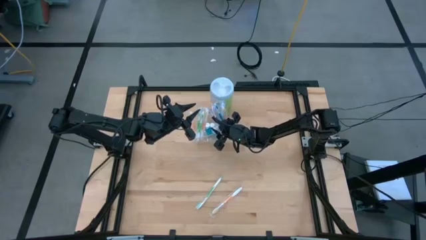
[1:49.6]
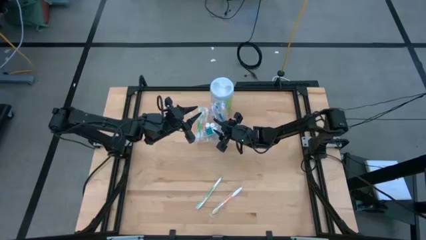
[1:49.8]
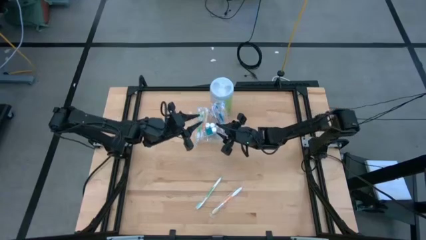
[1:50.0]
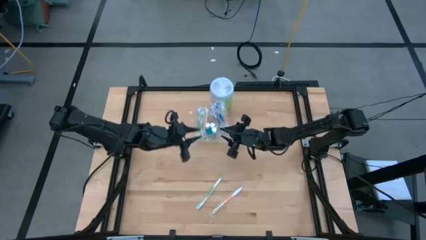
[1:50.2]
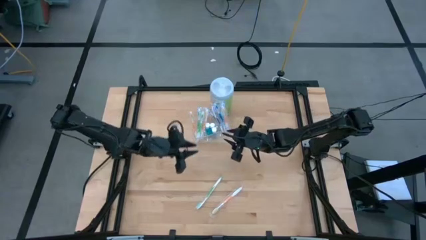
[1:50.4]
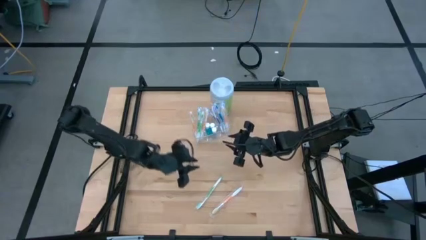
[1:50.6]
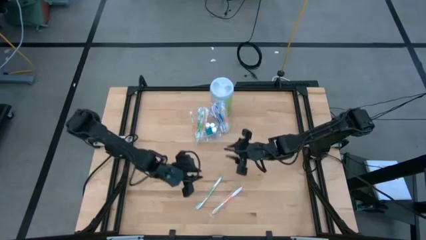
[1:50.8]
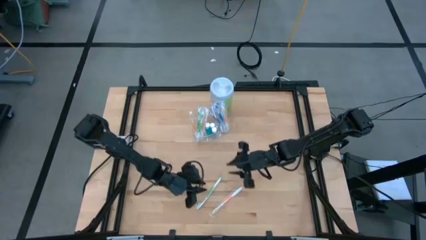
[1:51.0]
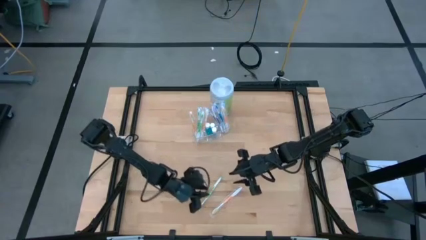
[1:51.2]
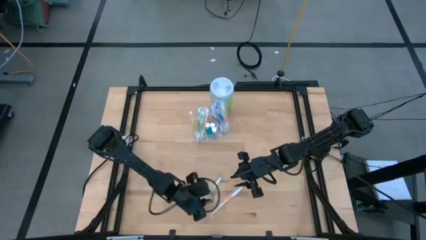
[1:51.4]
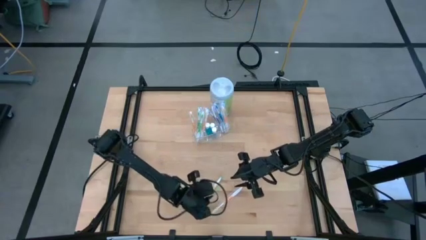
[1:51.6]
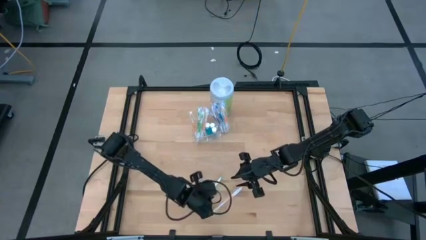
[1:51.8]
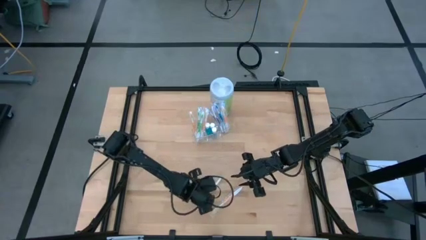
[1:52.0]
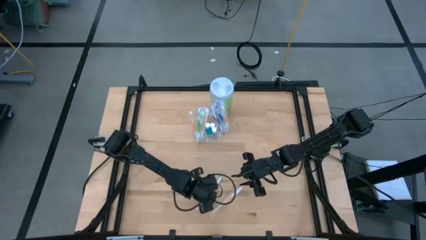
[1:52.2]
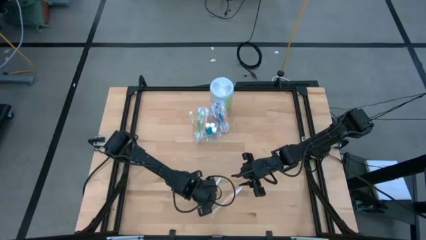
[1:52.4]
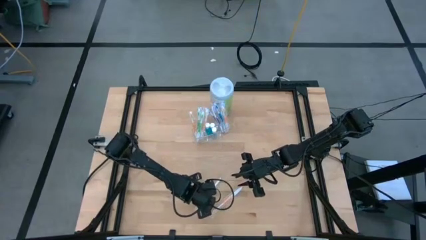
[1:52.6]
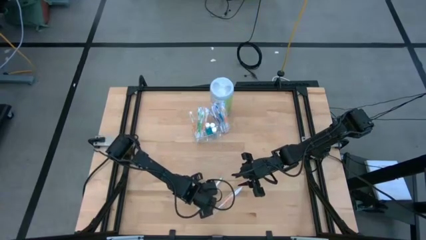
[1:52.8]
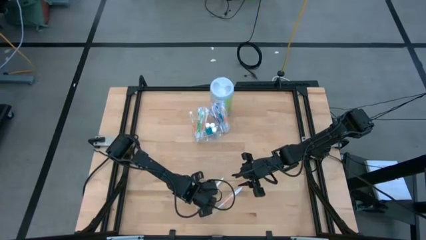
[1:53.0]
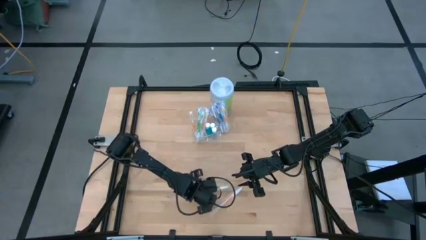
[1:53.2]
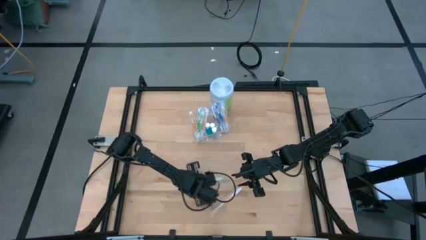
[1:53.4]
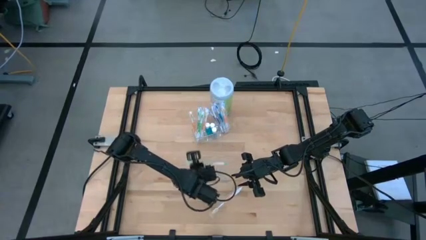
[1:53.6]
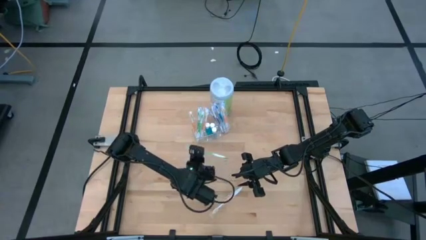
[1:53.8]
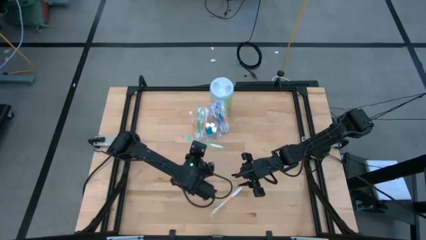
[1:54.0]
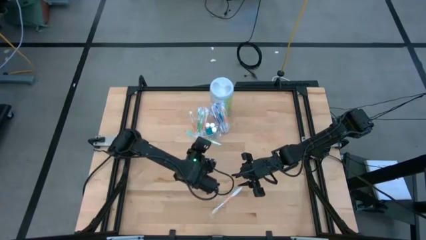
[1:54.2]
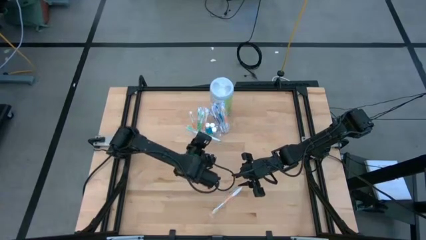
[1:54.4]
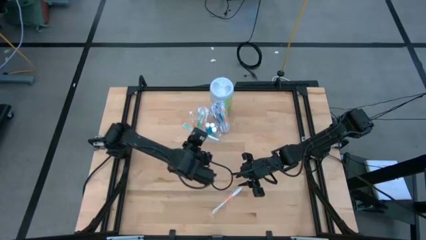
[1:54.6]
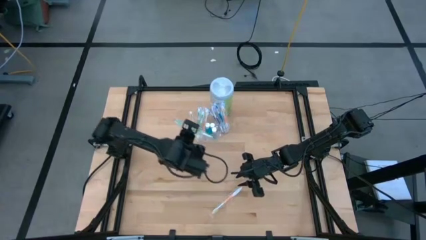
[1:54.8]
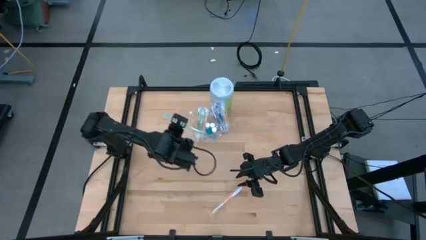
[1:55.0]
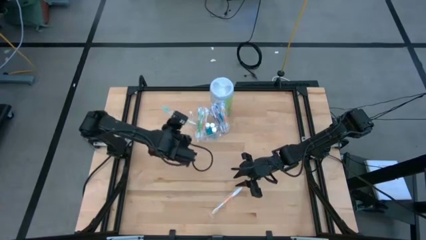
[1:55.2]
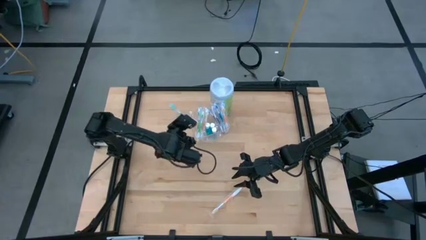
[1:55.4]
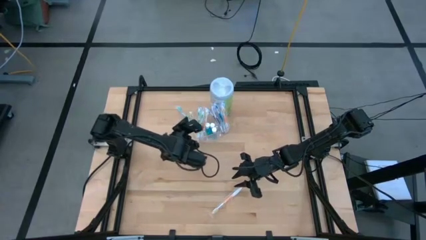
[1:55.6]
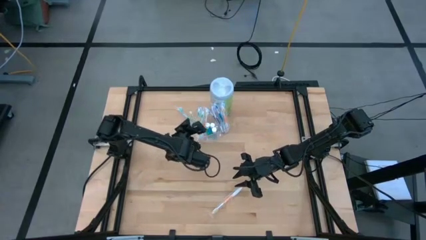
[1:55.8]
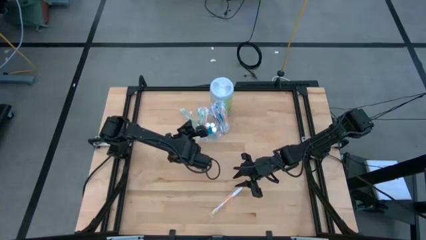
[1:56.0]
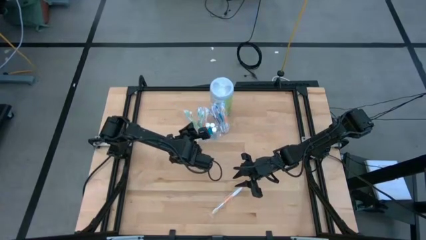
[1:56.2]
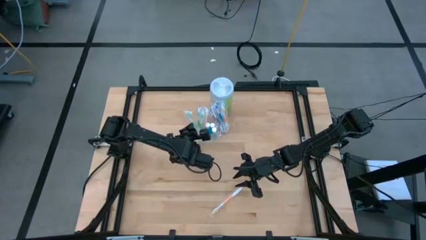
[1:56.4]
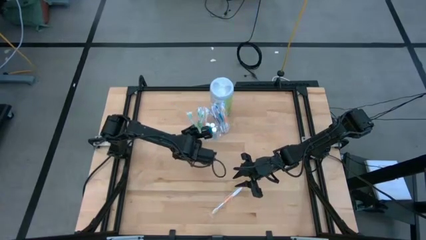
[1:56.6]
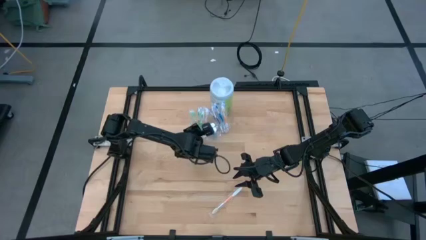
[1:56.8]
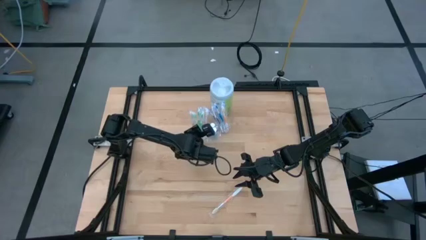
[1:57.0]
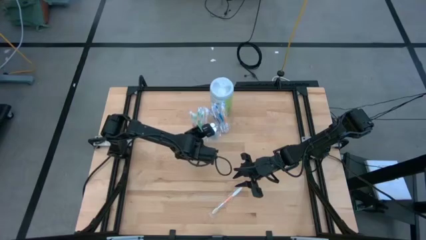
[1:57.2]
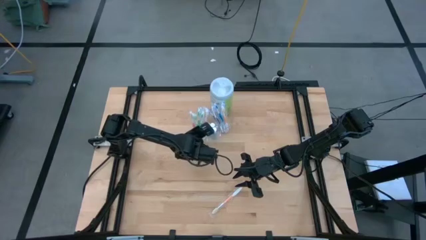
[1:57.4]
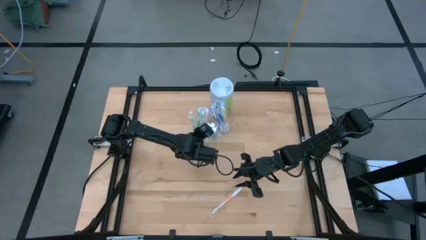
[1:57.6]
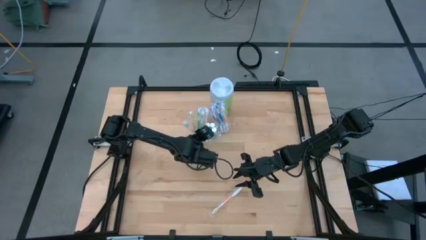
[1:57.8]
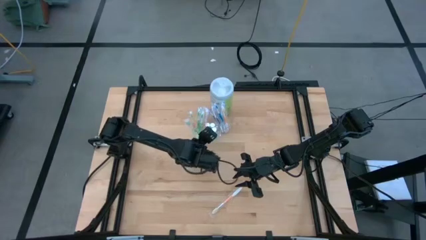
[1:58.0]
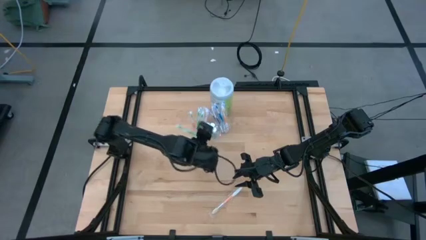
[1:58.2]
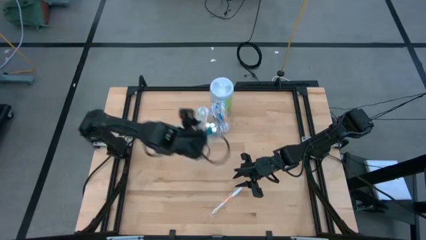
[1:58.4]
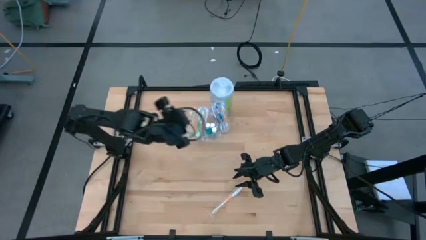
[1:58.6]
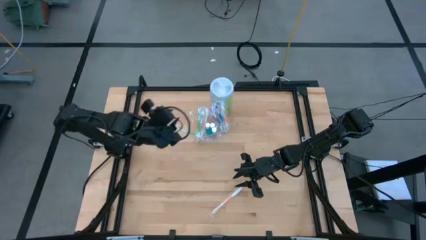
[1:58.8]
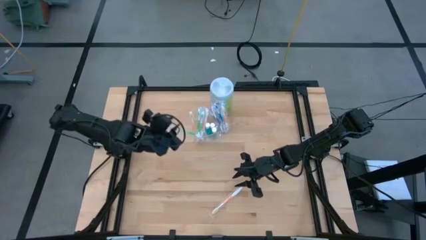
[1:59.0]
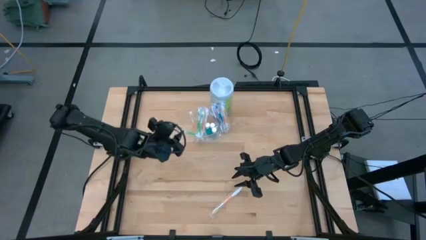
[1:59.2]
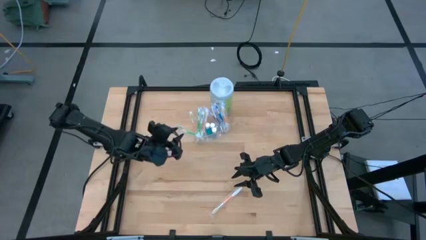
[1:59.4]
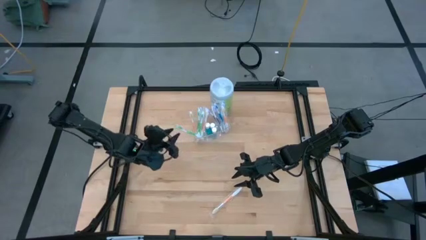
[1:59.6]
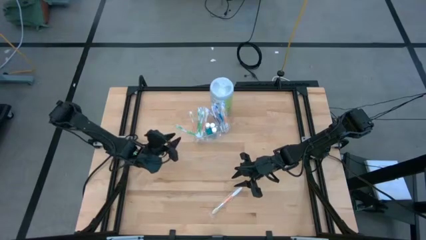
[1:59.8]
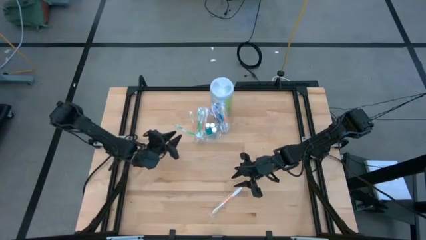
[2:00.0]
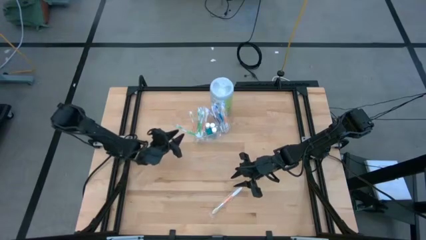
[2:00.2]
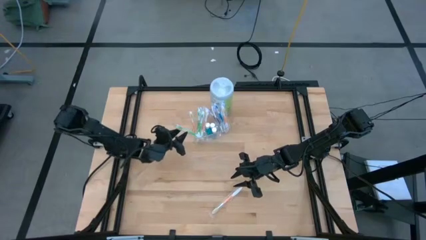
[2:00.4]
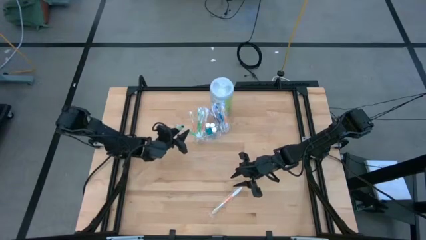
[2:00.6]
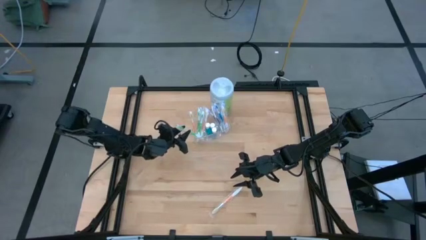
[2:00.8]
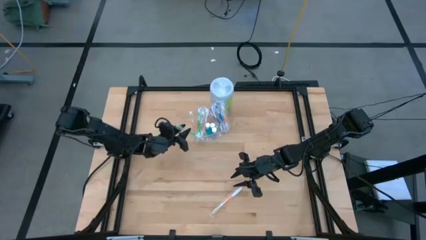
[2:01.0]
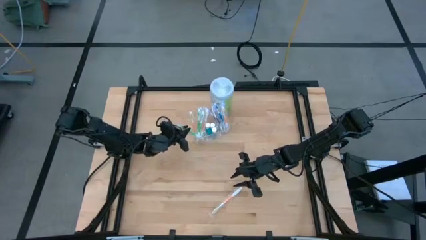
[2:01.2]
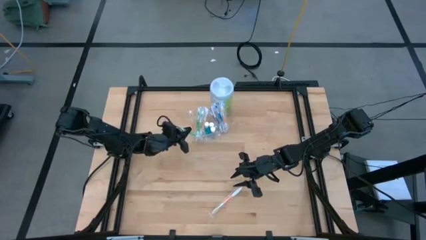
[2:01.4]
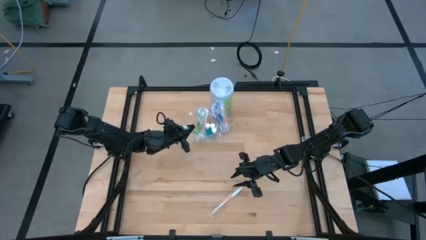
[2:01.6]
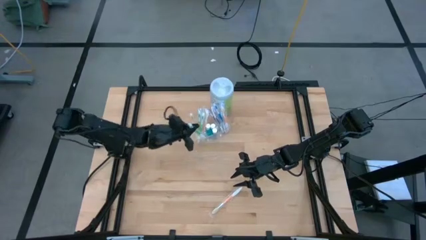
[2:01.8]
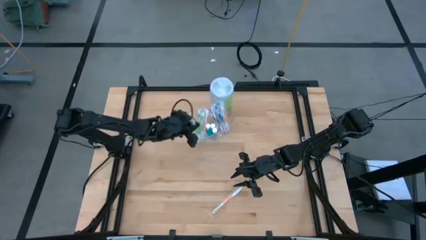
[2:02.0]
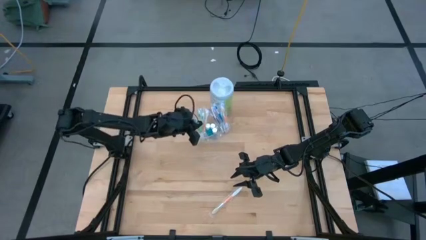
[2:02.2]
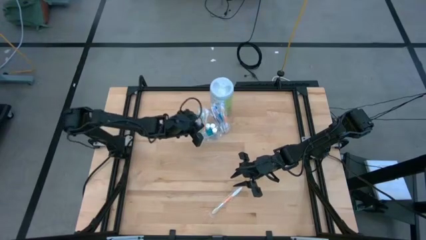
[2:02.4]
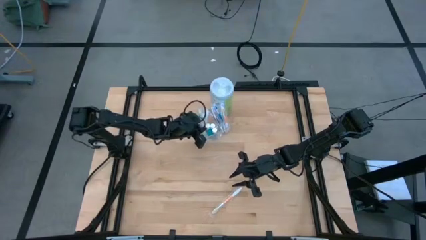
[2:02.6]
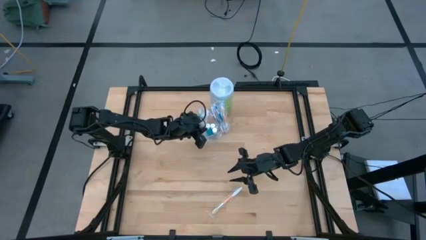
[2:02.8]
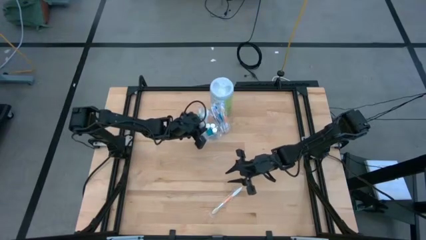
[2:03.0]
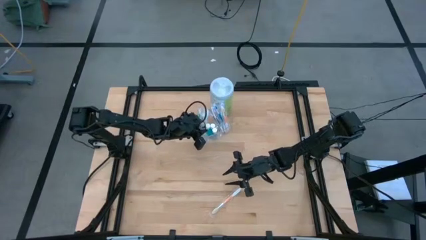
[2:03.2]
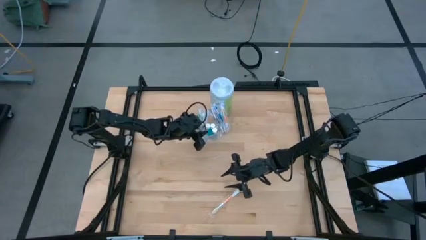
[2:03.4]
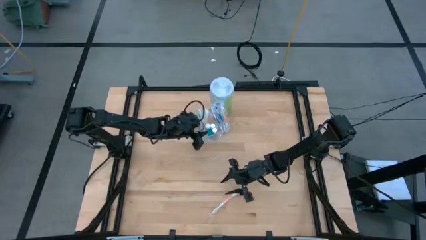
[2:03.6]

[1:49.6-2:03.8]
Task: Pick & Place toothbrushing station
Put the green toothbrush into the transparent organizer

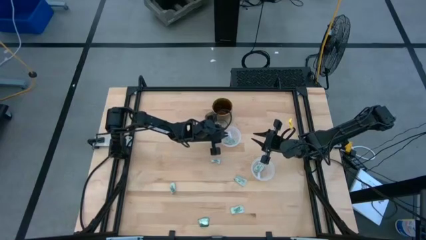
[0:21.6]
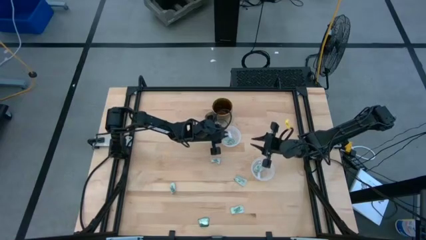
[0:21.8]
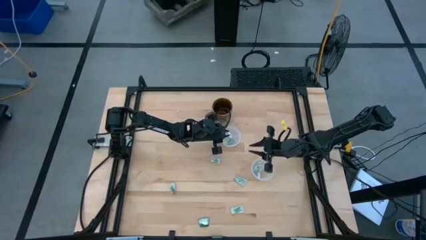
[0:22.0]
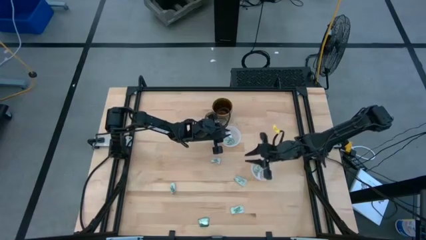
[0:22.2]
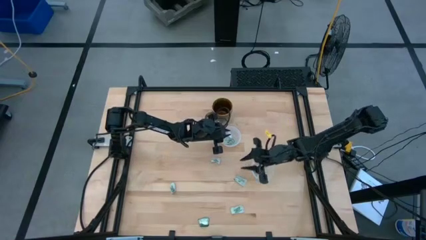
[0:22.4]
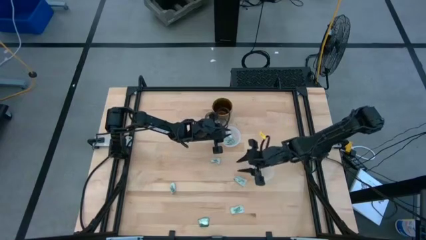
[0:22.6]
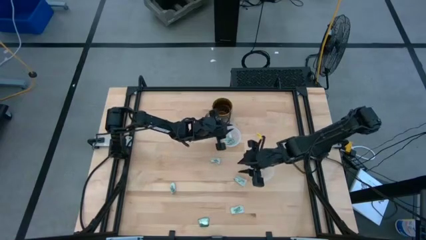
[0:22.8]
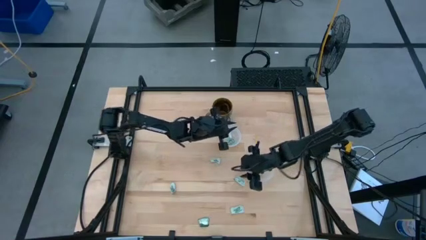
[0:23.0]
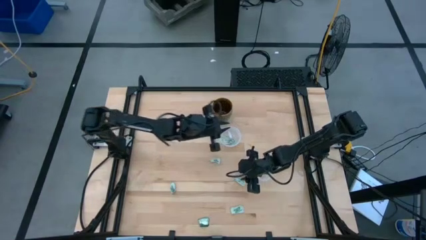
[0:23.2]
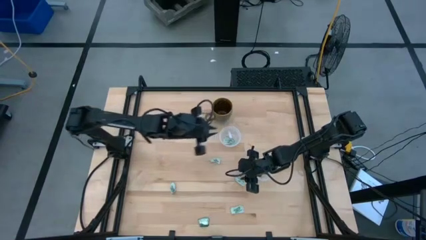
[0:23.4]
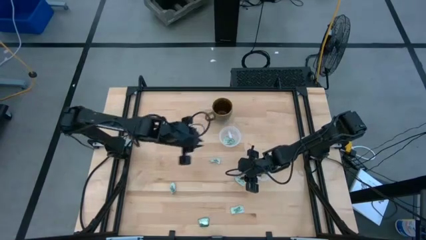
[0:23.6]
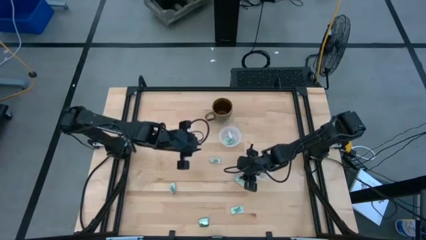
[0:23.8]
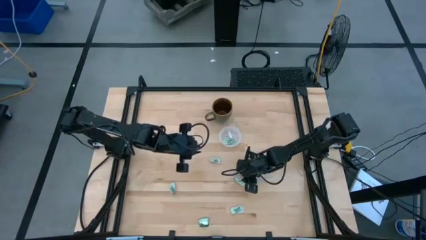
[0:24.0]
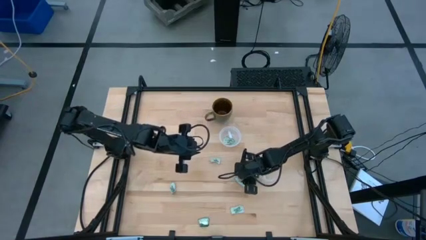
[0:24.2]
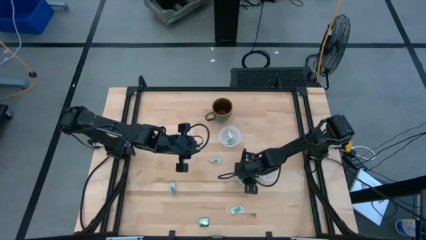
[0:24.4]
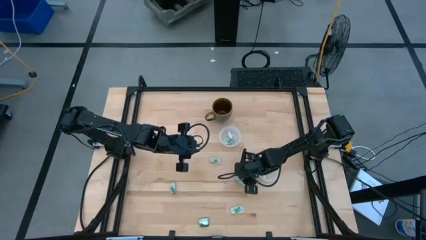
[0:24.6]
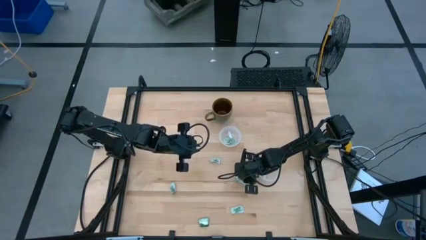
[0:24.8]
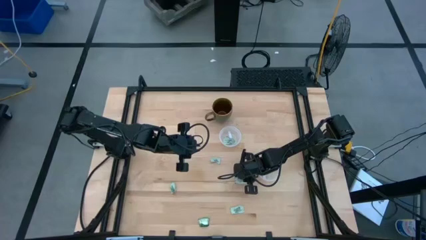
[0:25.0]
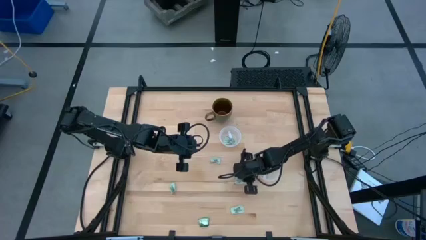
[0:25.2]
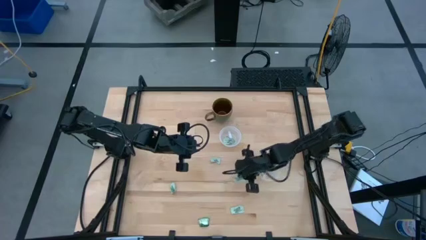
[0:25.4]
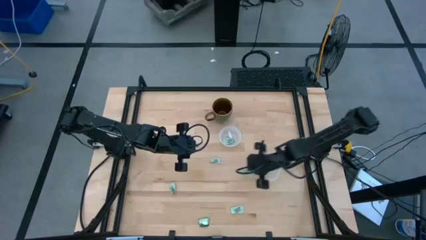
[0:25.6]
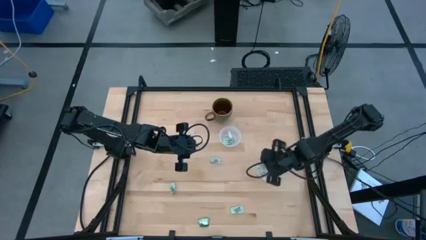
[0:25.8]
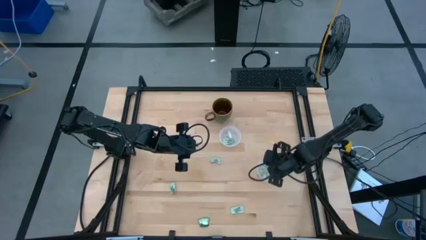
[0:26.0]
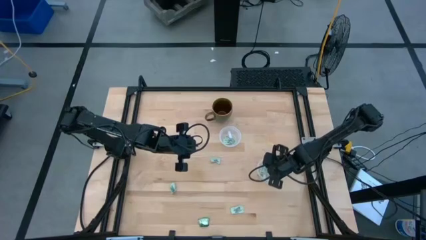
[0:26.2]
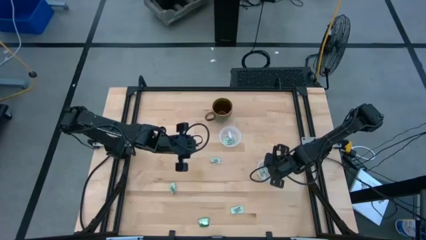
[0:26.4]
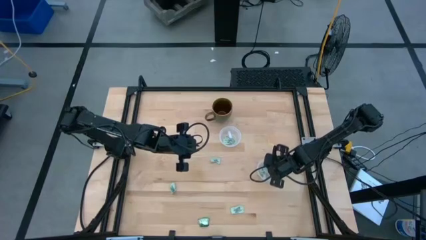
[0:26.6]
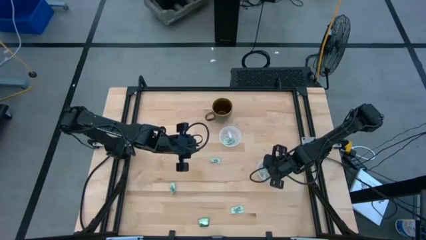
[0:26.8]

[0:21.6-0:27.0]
Task: Pick and place items into bin
Put the stevia packet into the bottom transparent bin
